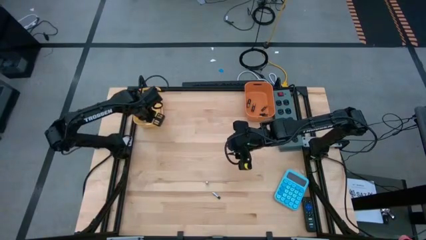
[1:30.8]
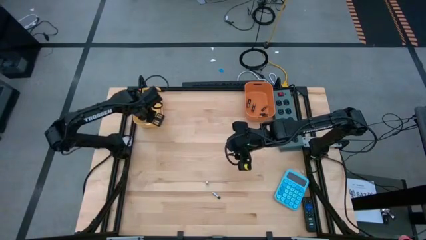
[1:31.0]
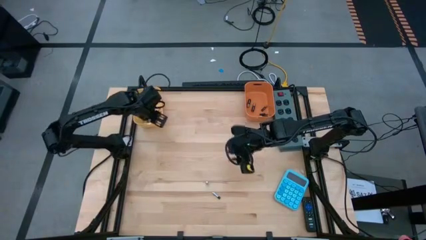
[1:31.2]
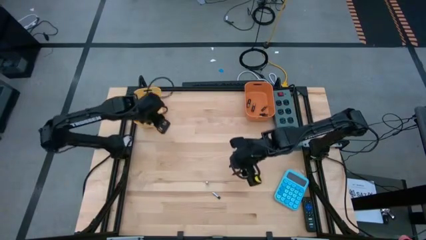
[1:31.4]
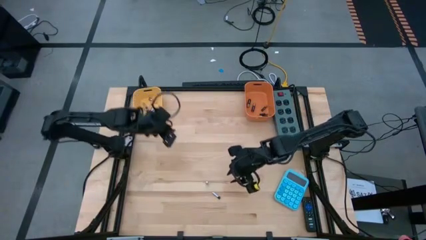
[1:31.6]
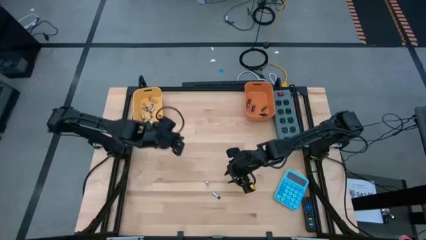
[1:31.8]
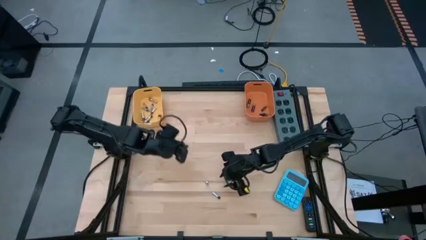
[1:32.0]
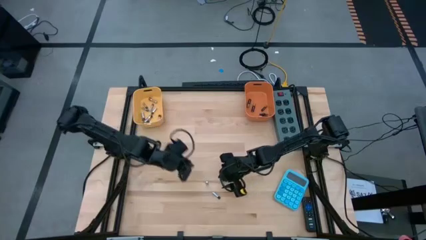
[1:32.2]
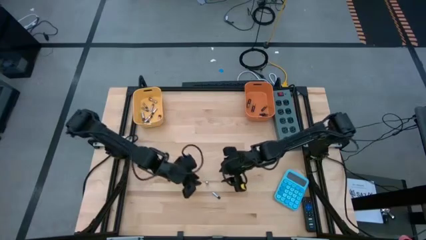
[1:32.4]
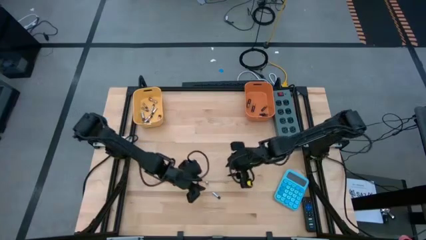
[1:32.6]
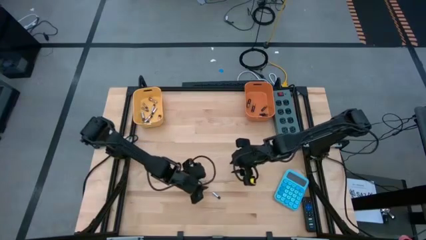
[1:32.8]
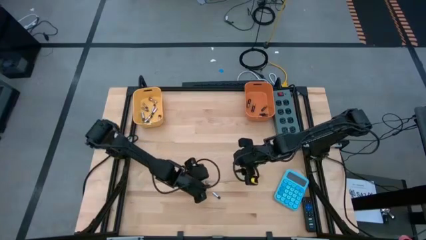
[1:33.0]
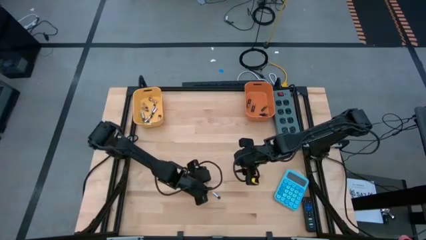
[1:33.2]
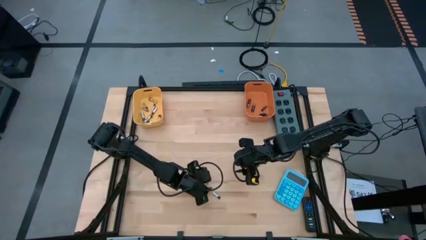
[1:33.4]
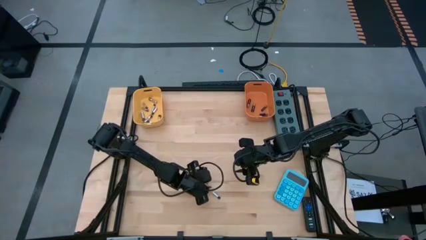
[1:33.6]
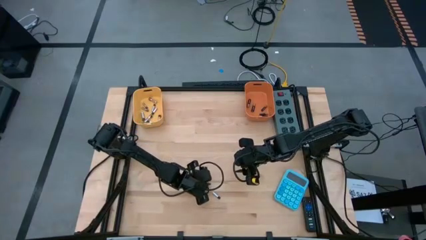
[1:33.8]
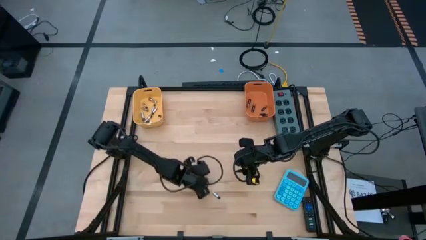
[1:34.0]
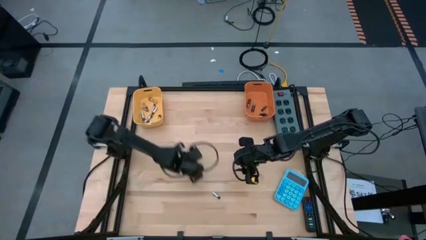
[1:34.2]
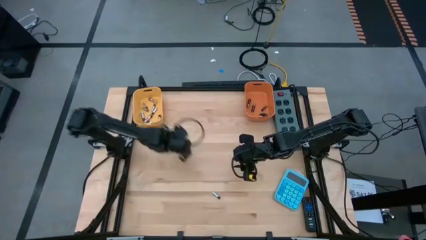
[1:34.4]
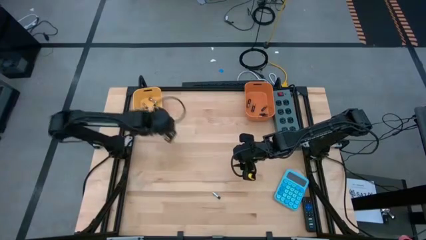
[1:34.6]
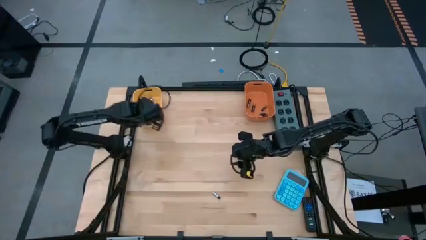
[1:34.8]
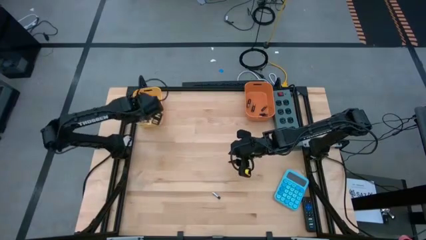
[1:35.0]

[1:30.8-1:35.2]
Task: Sort batteries
Put the silver battery into the yellow bin

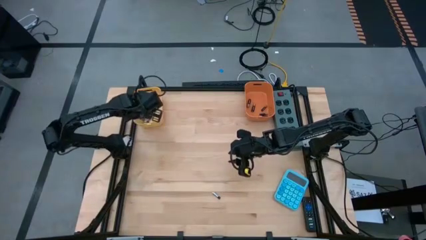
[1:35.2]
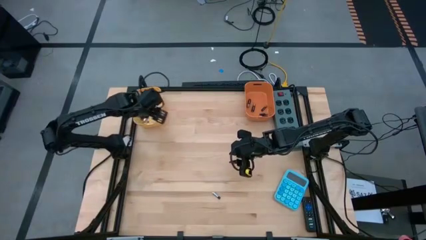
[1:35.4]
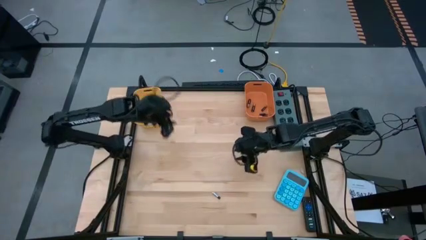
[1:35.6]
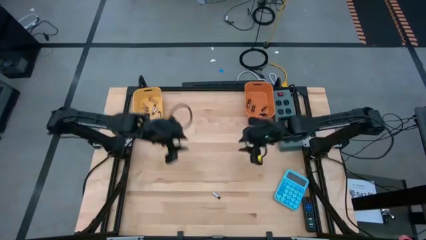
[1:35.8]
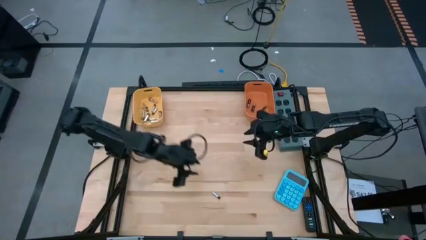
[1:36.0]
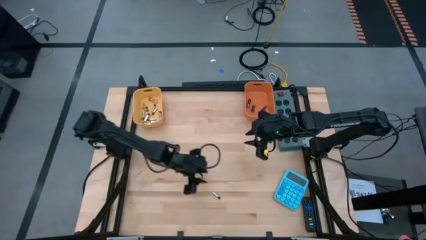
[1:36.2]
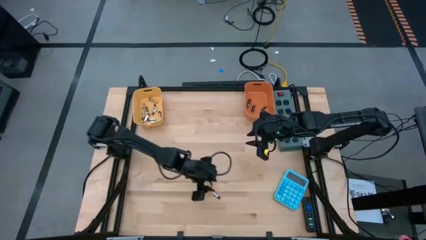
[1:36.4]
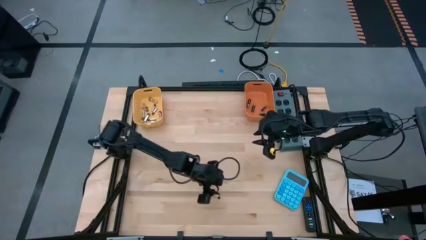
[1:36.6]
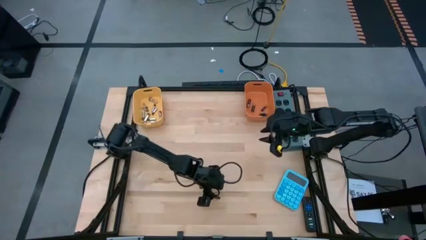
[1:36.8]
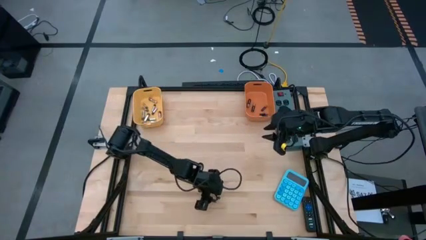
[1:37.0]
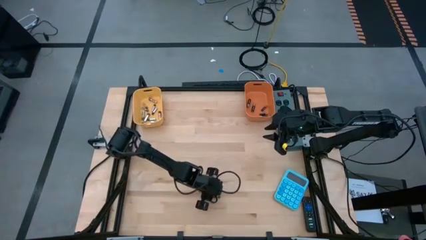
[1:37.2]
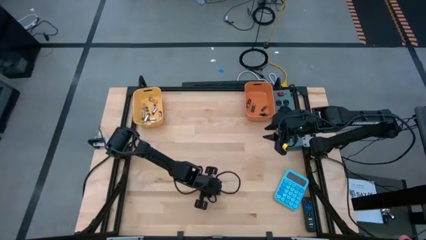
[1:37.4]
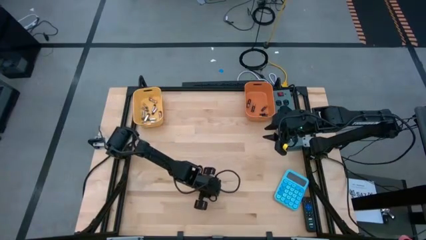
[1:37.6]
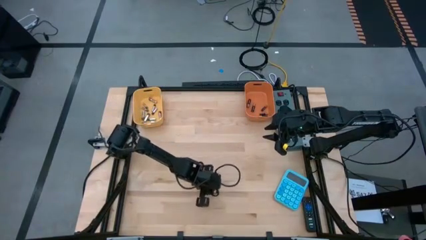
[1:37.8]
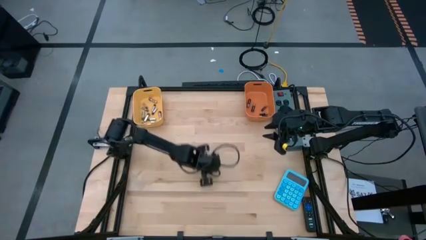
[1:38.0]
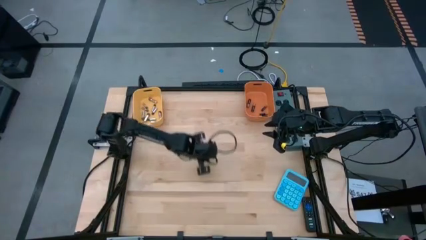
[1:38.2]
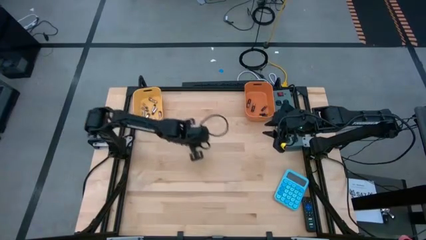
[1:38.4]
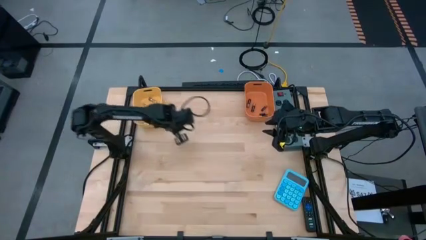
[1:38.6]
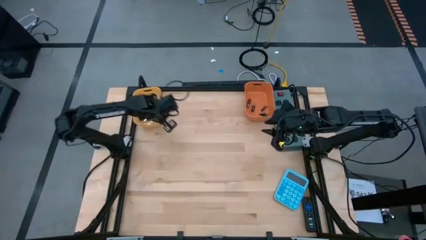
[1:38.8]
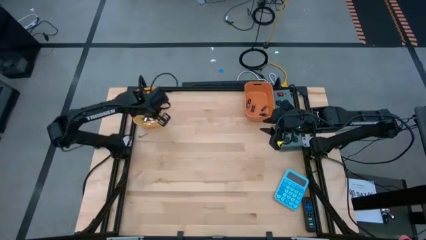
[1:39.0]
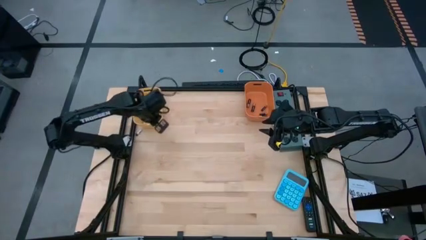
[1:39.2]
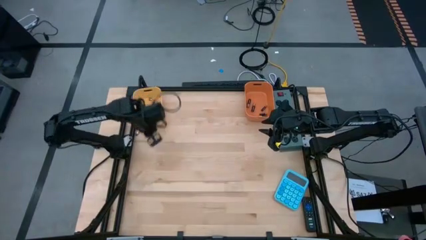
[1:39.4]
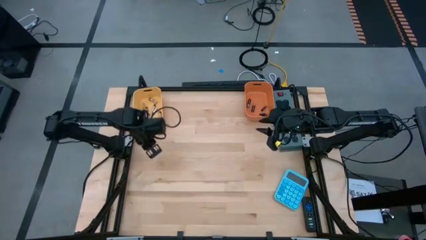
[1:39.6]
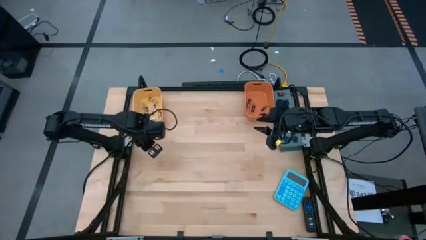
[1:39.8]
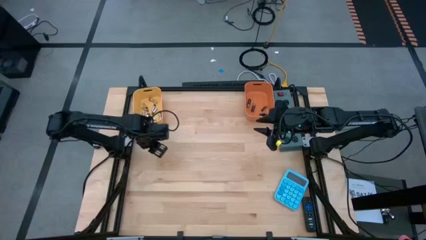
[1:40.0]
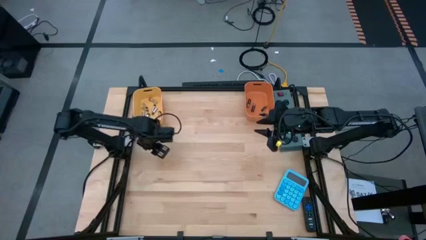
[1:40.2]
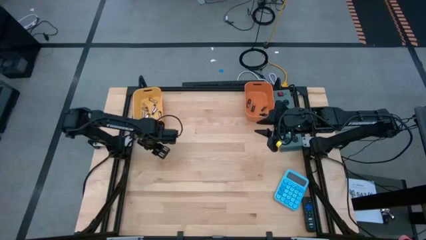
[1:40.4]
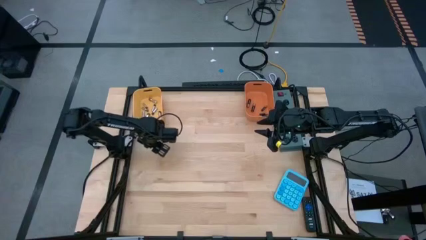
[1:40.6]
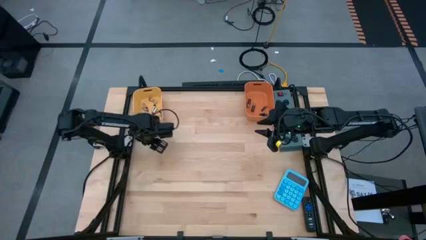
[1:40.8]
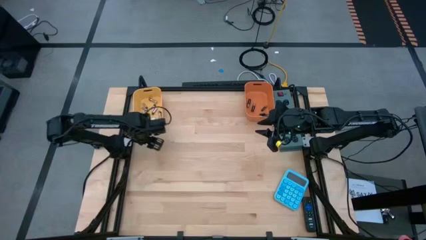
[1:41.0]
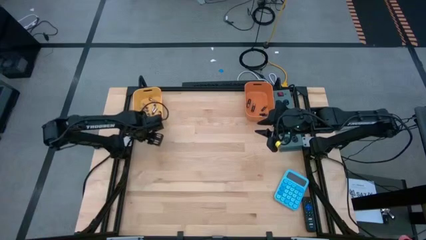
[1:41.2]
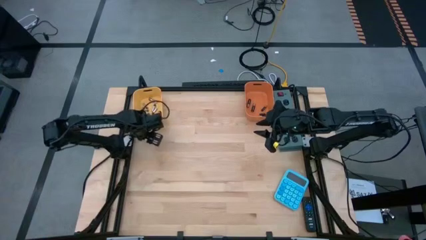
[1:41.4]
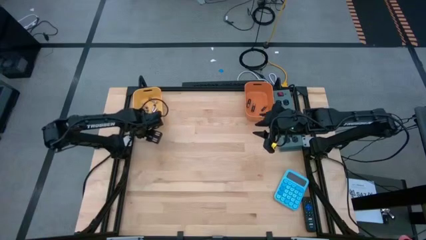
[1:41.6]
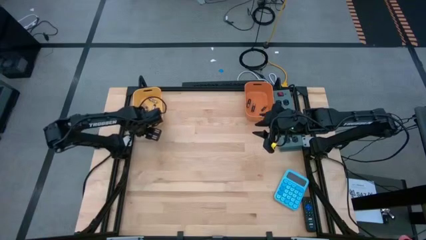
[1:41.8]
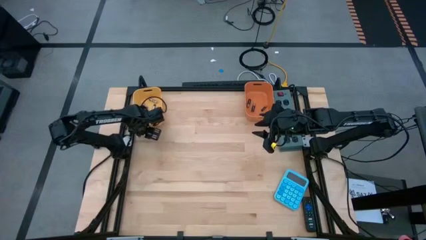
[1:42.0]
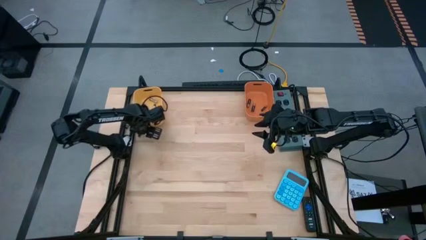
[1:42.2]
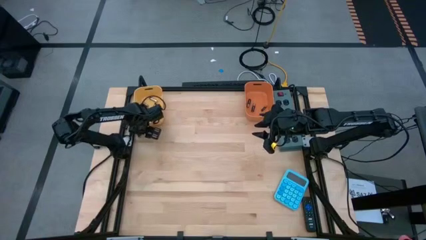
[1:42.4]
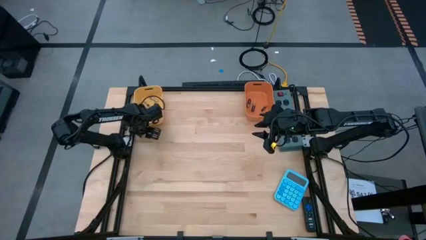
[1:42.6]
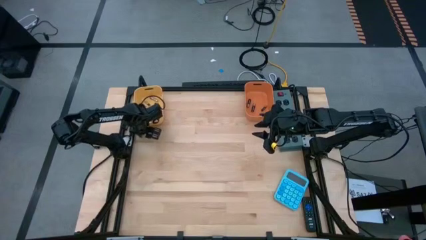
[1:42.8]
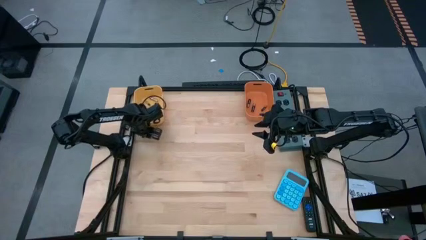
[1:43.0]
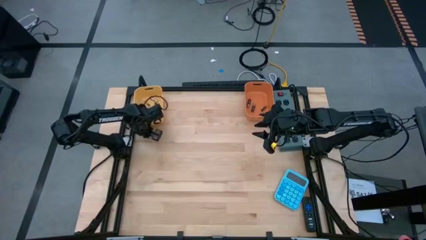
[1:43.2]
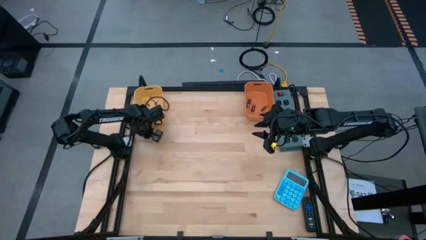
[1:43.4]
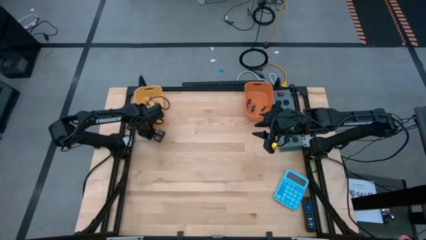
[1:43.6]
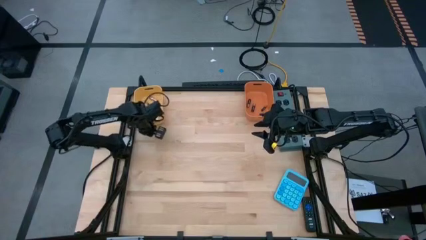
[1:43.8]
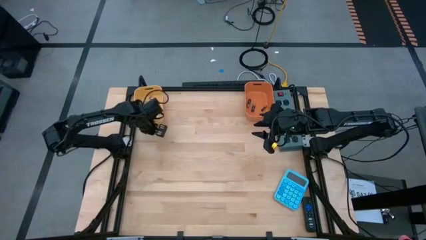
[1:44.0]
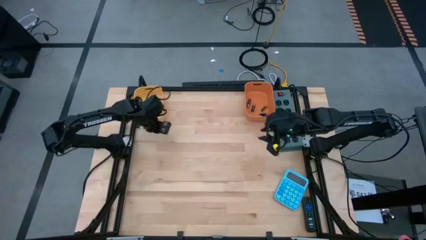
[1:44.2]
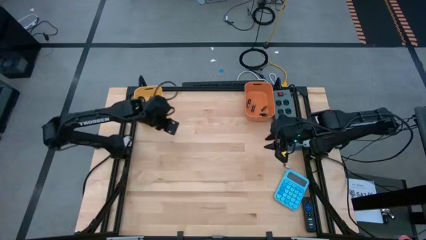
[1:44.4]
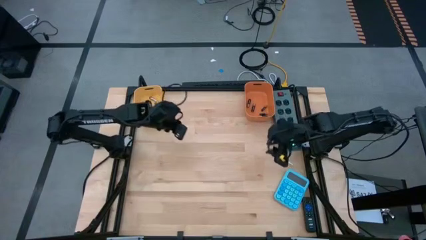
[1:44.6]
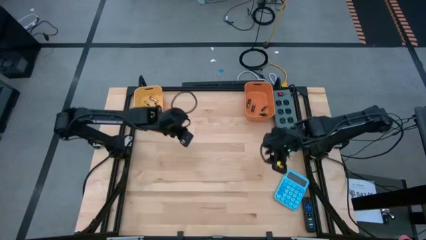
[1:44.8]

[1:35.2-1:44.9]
Put the silver battery into the yellow bin

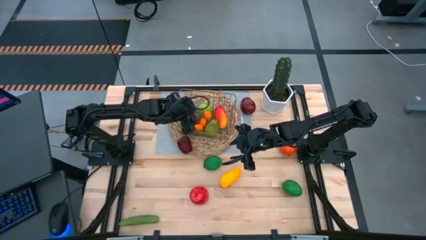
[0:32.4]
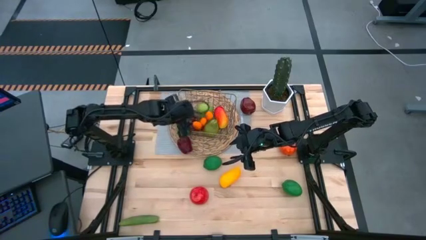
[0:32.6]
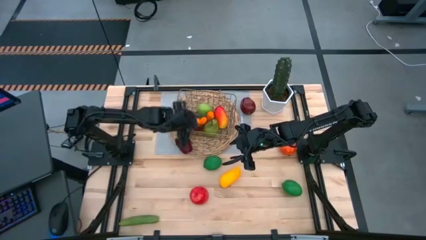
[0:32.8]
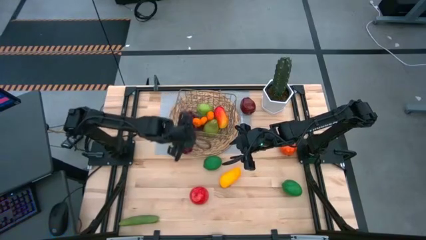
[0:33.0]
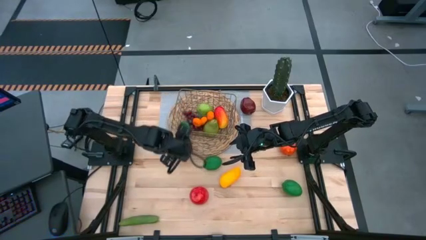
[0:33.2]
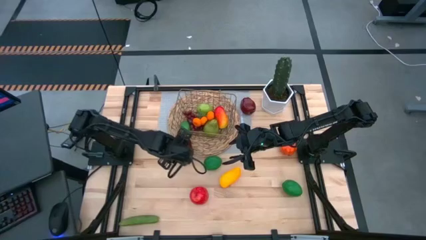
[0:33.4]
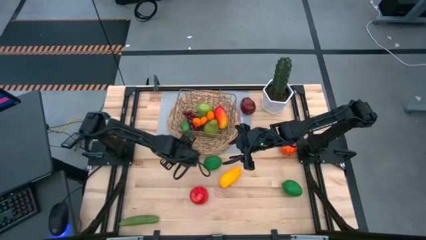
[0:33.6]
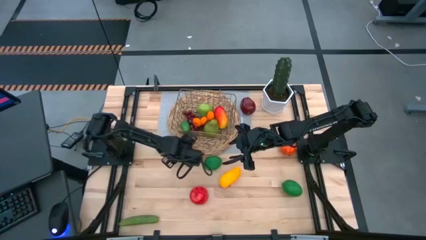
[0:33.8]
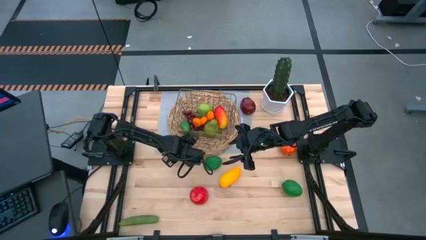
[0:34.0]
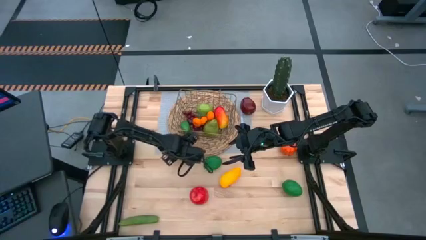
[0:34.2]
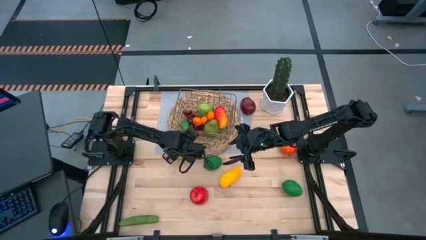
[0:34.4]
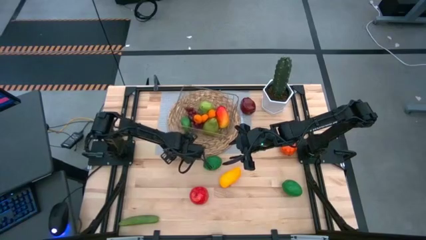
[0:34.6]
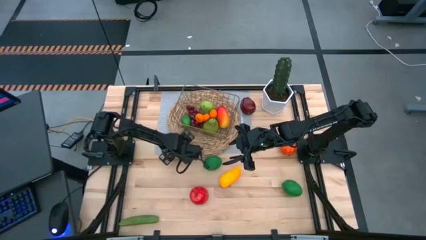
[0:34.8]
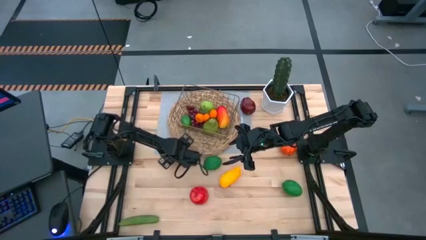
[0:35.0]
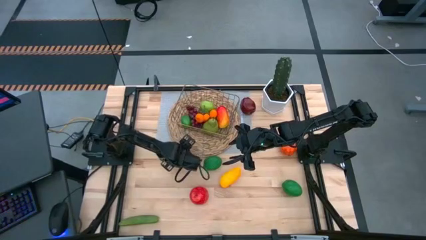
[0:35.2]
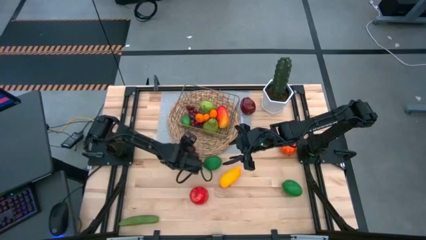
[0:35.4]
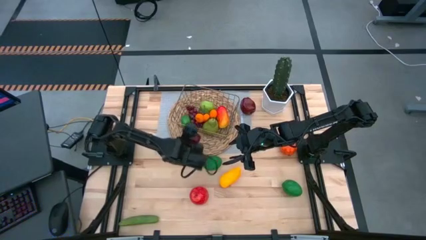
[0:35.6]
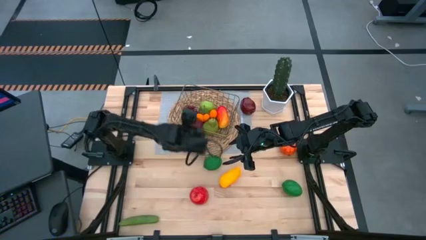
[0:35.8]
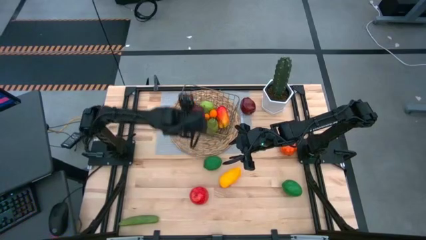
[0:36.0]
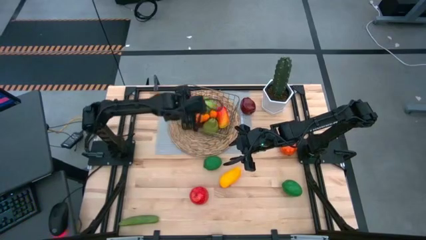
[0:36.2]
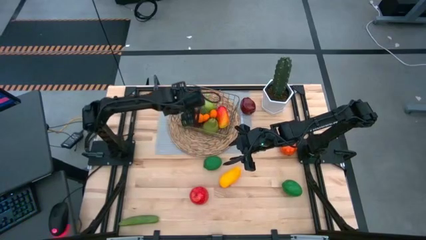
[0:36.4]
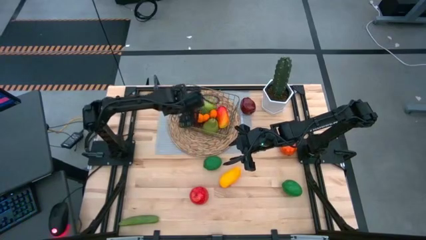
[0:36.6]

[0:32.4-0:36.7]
Task: Build produce basket
Put the bottom dark red apple into the gold wire basket
